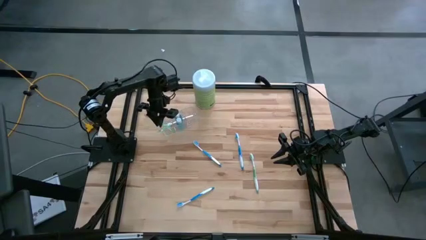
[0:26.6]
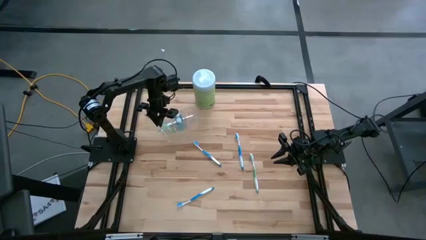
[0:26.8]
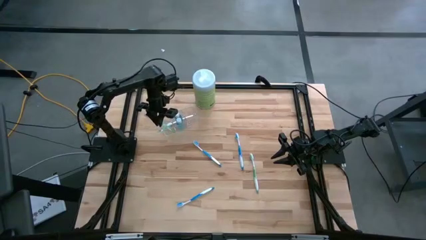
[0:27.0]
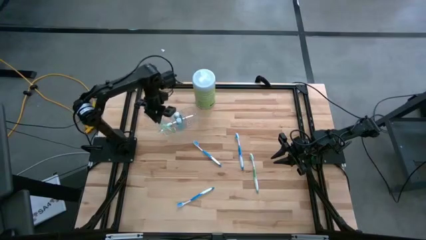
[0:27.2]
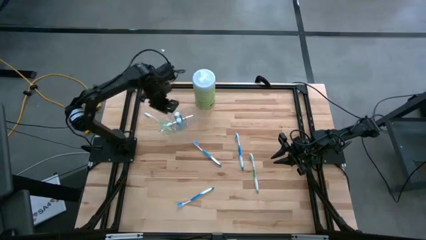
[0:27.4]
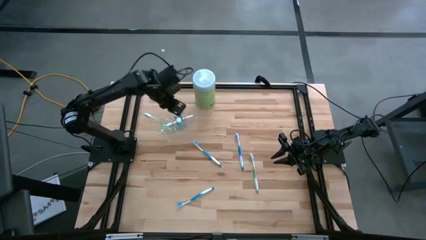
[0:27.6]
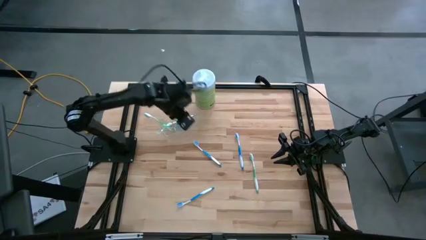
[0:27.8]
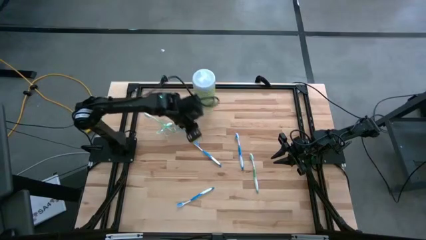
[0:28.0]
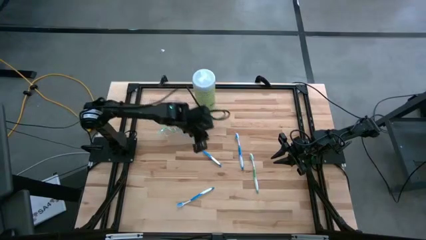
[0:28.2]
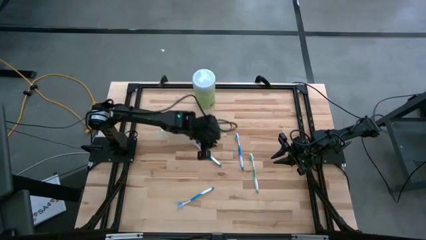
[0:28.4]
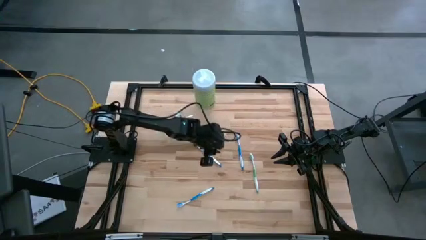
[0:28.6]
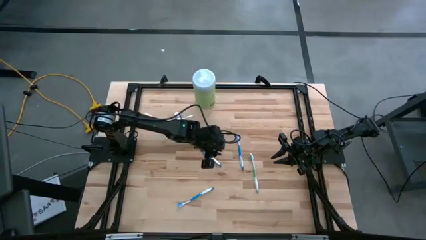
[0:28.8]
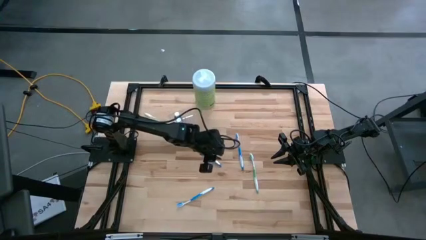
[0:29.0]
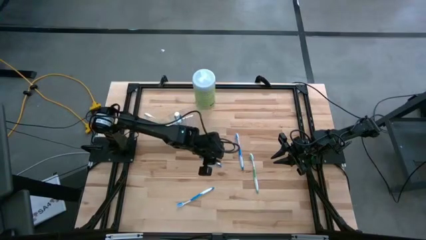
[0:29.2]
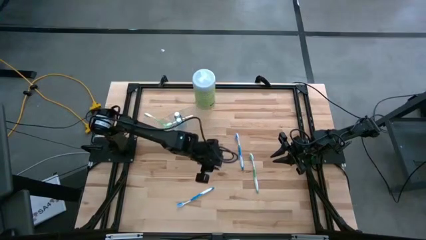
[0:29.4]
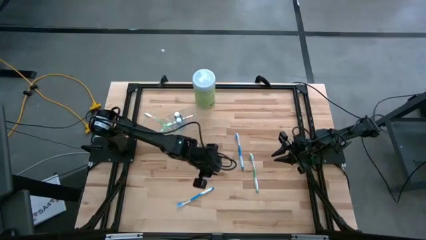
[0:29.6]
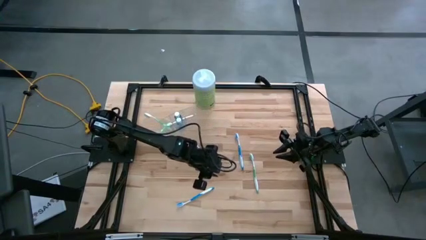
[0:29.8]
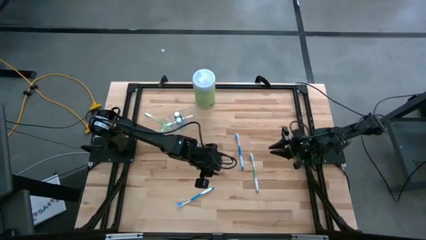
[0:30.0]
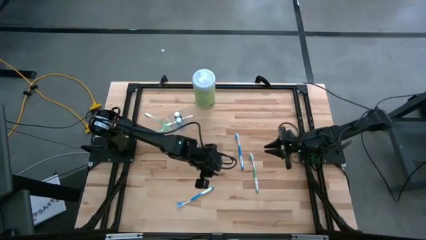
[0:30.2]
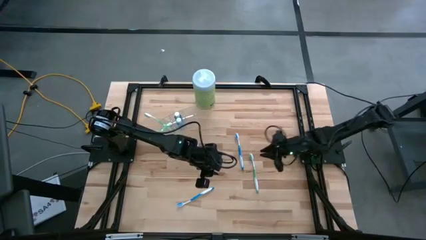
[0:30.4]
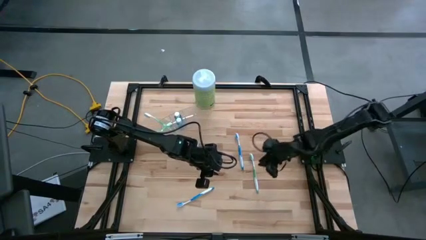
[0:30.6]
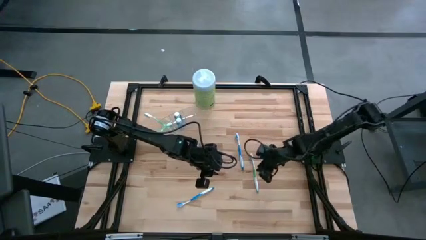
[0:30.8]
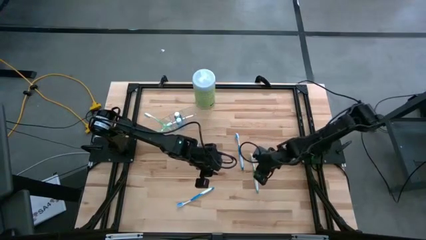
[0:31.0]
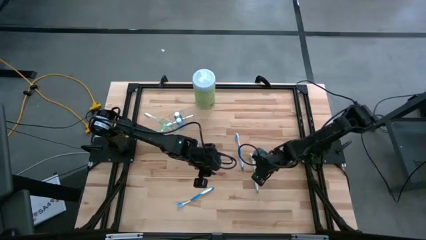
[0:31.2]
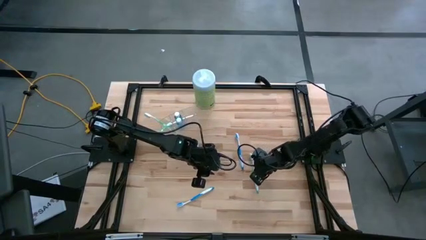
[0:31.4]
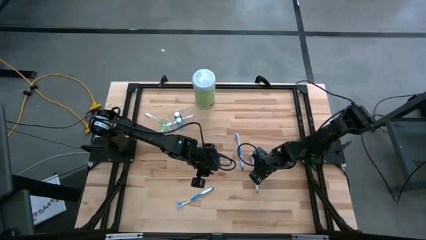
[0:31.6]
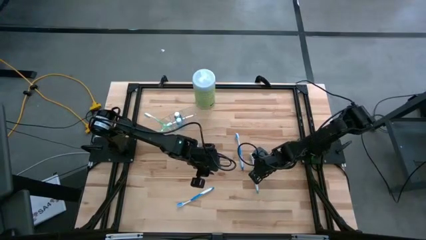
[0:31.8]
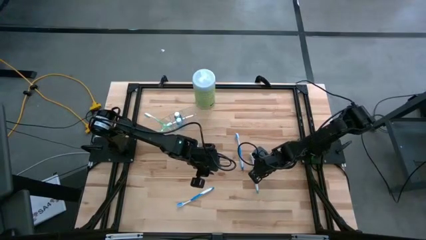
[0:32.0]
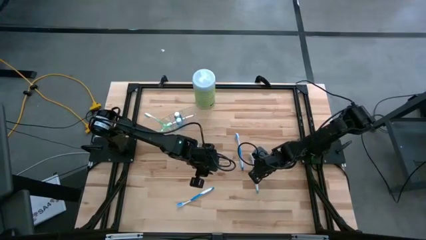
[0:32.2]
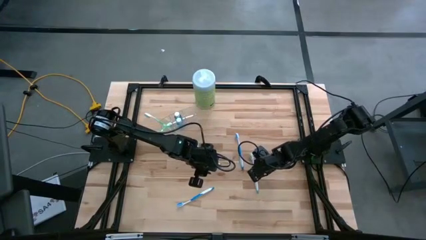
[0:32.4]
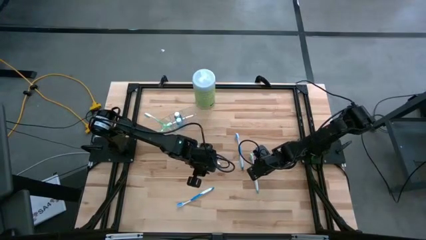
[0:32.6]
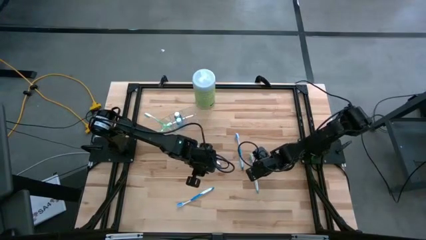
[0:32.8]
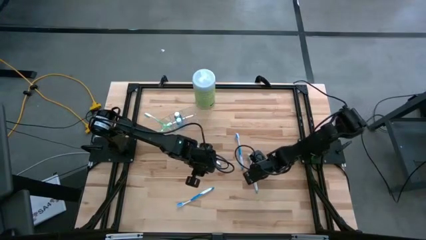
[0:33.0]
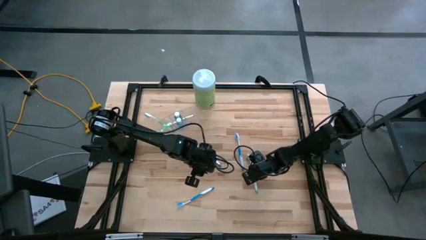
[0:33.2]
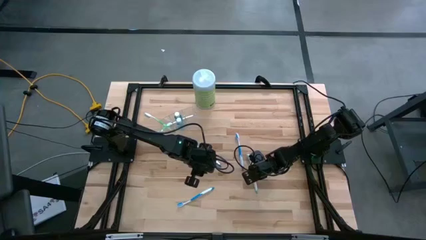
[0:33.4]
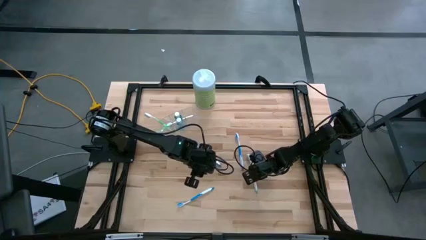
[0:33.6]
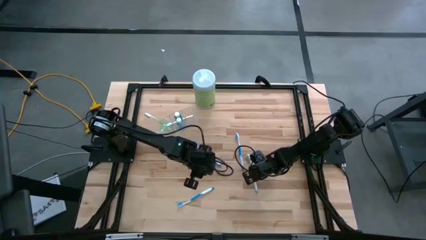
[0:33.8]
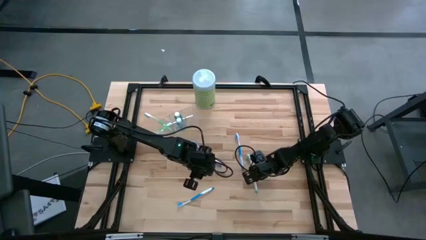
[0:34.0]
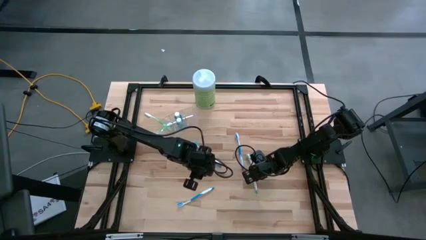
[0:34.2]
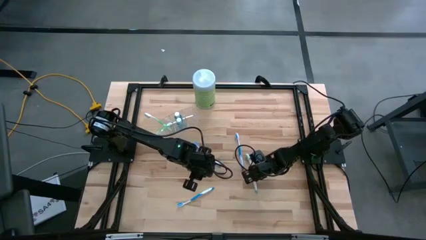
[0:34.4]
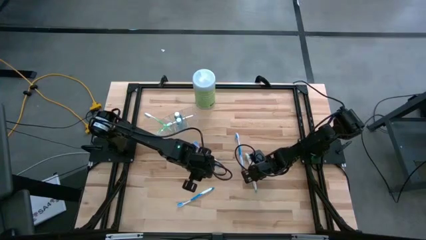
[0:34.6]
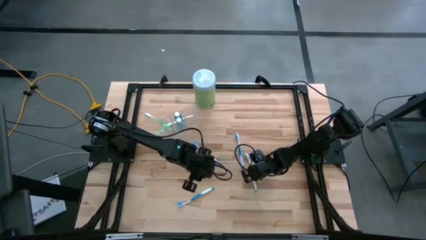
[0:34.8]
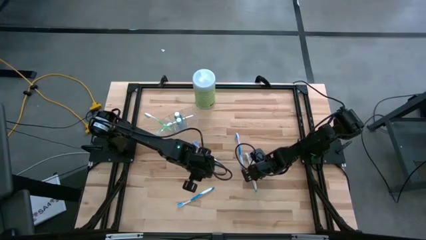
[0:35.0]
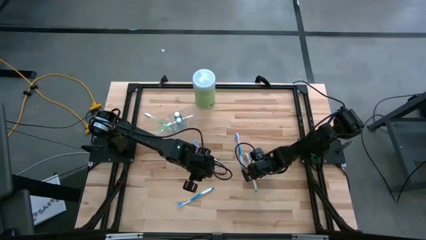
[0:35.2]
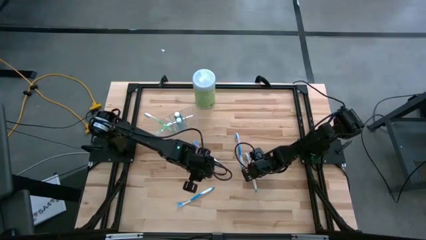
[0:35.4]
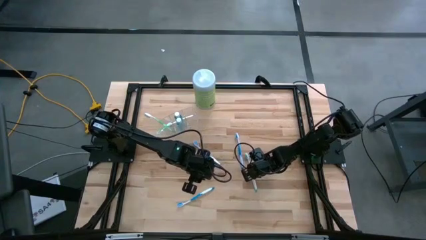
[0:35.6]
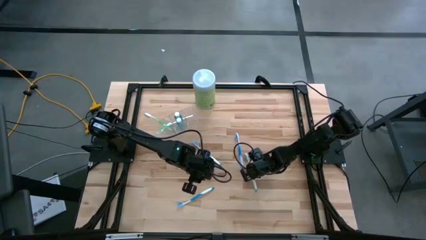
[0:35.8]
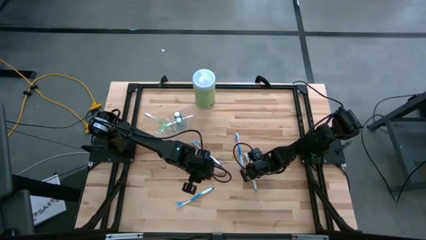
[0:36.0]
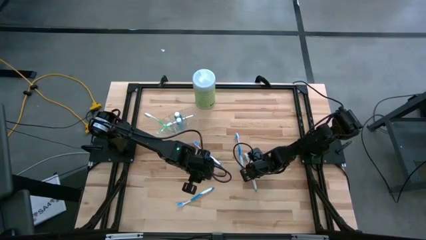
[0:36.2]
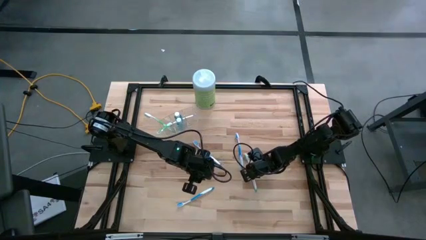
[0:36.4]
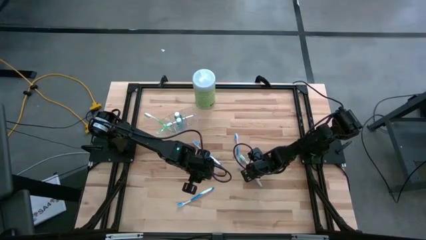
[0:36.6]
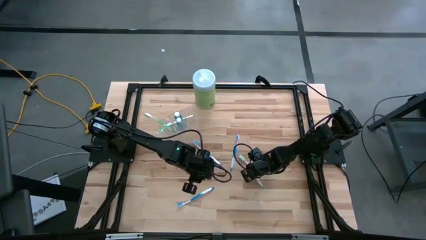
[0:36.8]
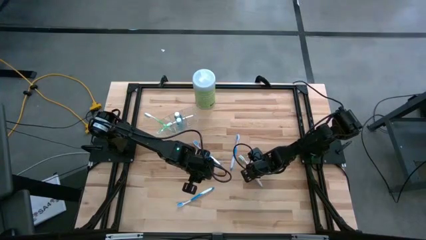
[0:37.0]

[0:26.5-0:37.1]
Task: Pick & Place toothbrushing station
Put the green toothbrush into the transparent organizer

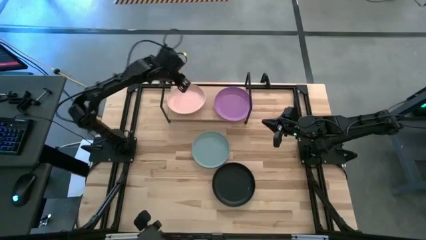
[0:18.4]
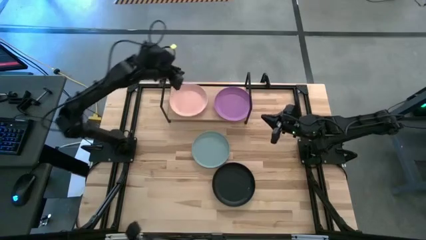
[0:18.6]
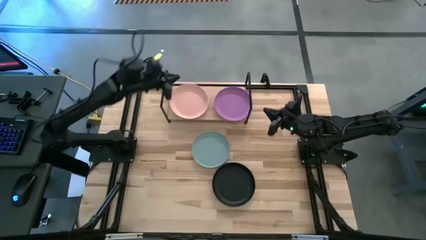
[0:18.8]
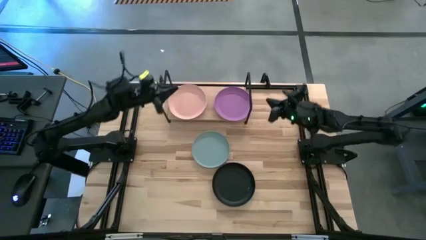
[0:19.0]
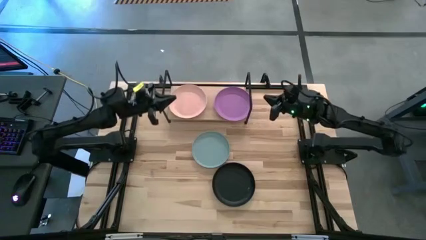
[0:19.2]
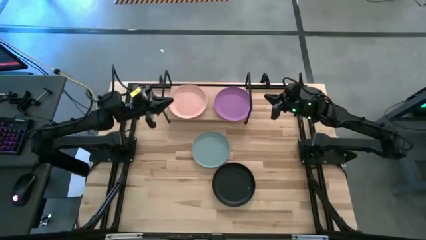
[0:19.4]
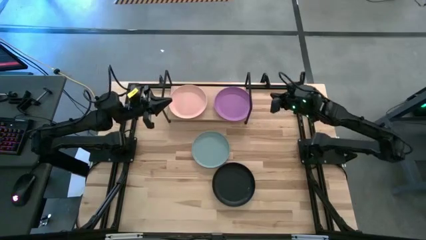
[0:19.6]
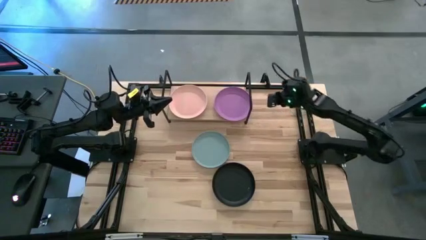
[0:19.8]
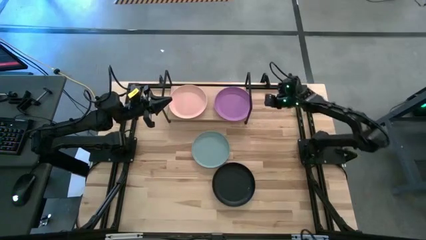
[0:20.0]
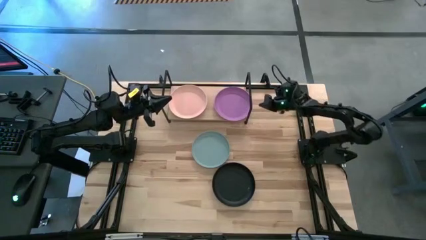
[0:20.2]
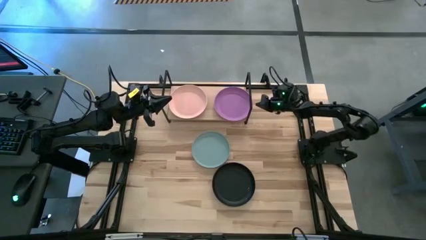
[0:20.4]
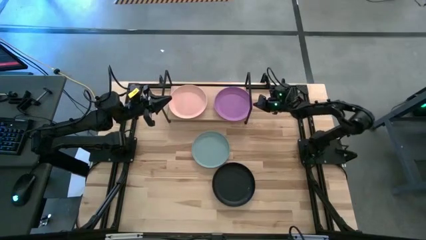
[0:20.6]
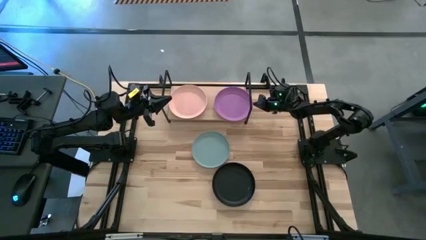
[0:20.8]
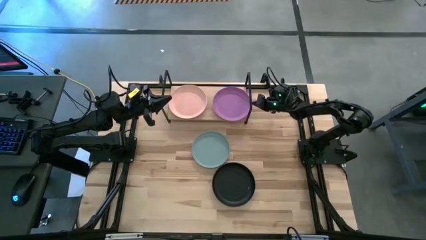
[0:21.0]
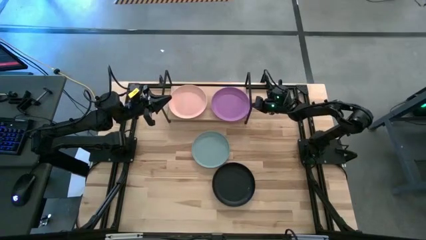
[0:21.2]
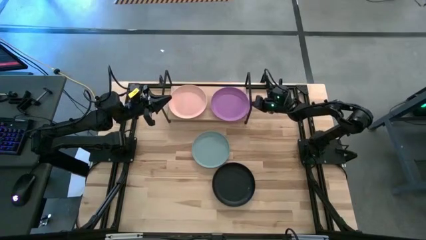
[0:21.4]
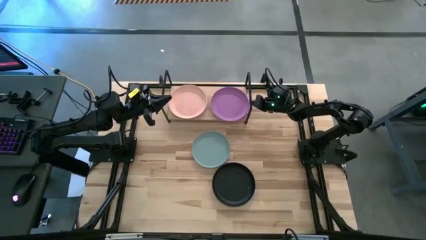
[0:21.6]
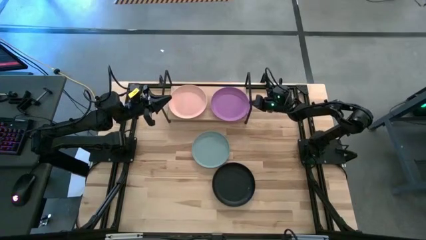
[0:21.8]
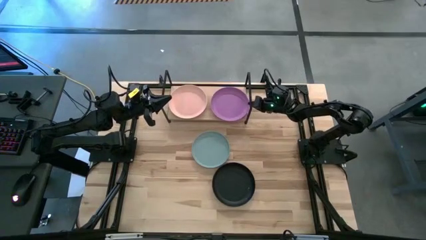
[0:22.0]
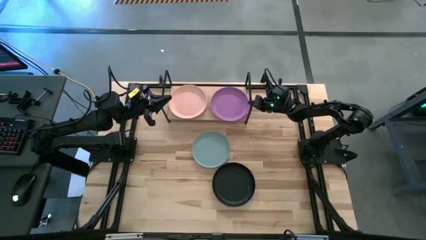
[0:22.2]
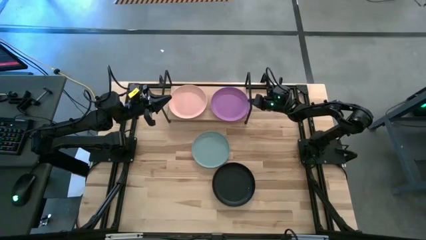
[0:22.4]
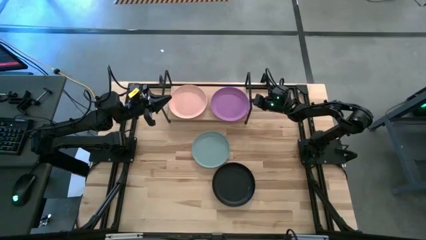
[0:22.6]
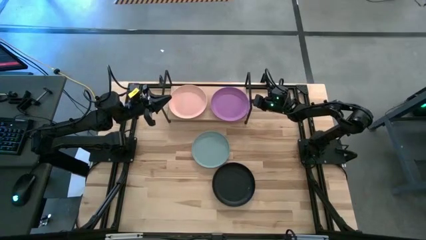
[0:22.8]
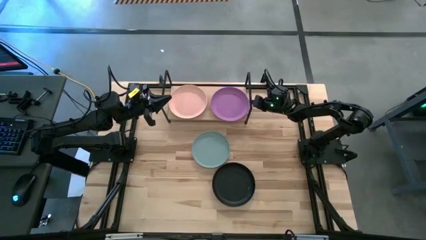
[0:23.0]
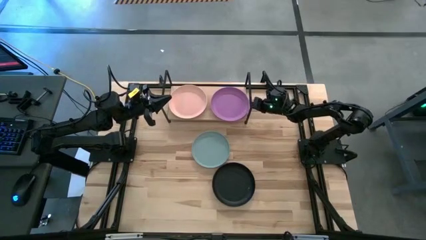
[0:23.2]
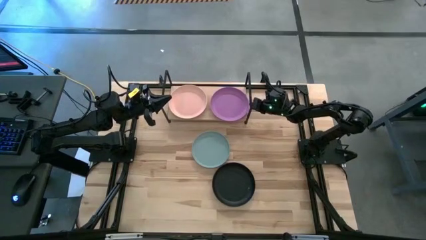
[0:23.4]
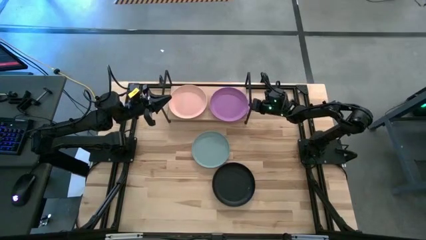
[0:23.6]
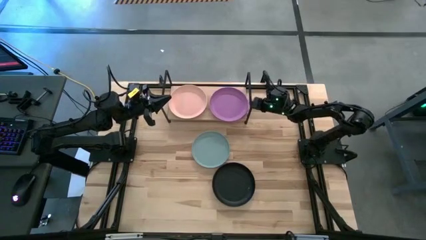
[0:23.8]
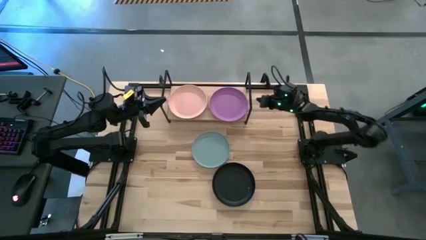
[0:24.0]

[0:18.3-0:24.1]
Task: Place and stack plates onto a shelf
Adjust the purple plate
